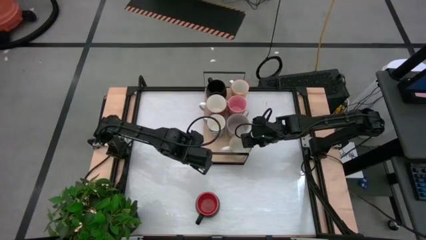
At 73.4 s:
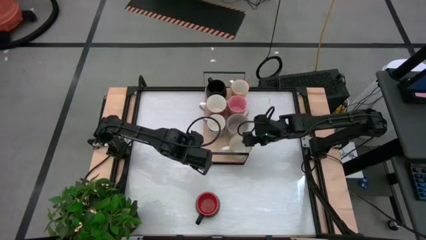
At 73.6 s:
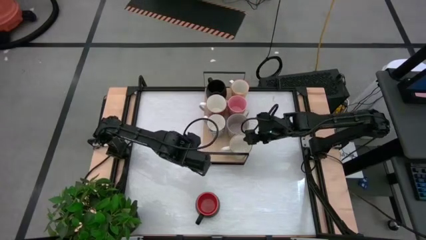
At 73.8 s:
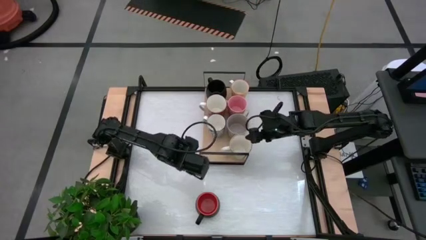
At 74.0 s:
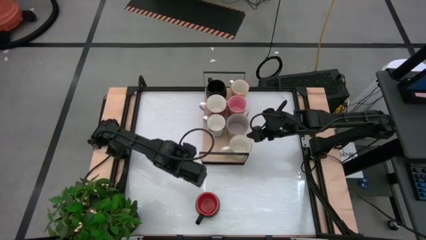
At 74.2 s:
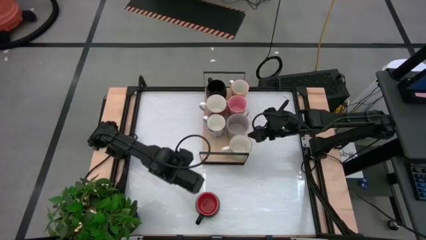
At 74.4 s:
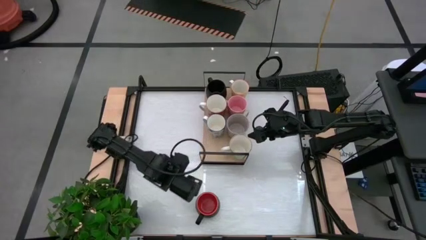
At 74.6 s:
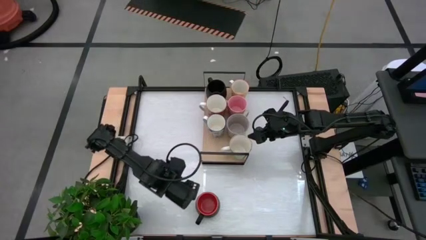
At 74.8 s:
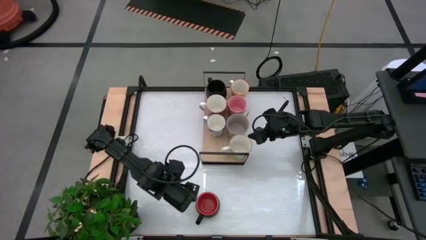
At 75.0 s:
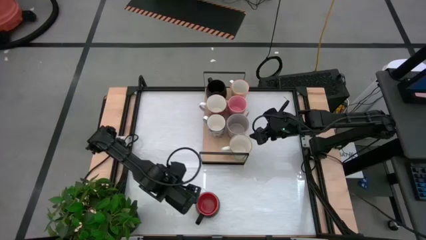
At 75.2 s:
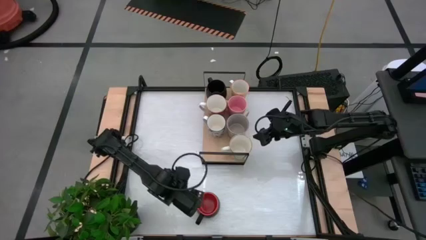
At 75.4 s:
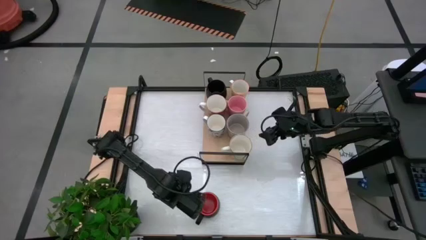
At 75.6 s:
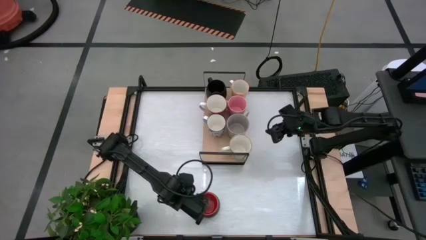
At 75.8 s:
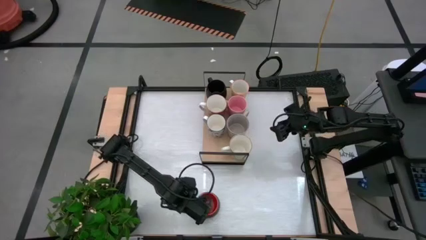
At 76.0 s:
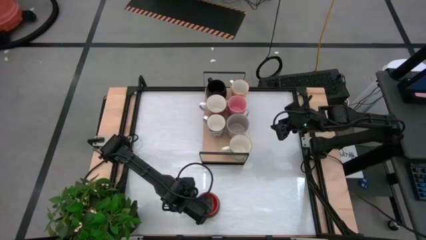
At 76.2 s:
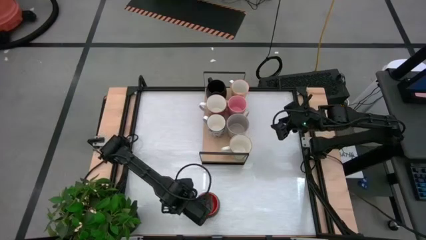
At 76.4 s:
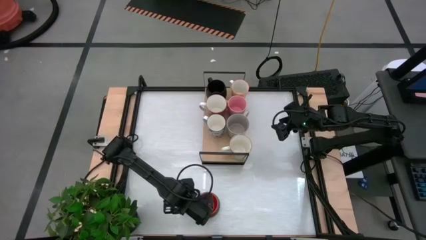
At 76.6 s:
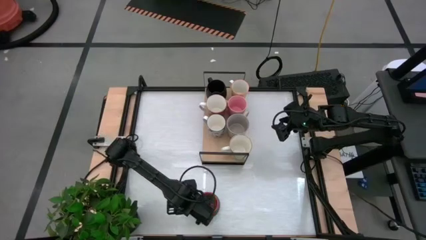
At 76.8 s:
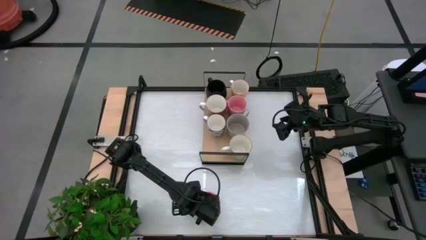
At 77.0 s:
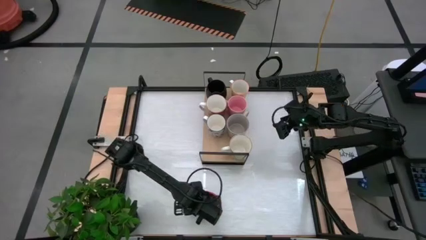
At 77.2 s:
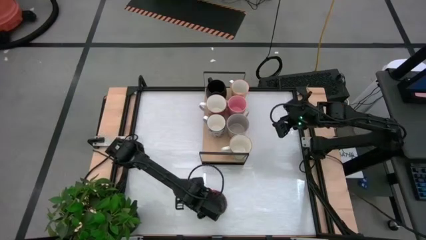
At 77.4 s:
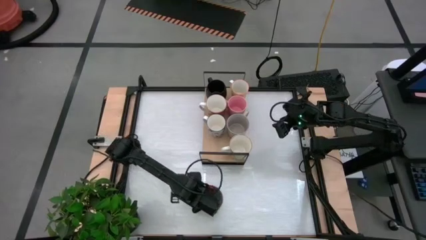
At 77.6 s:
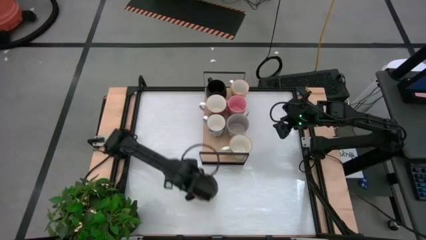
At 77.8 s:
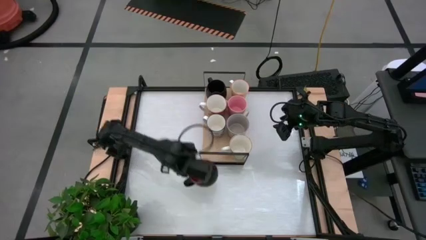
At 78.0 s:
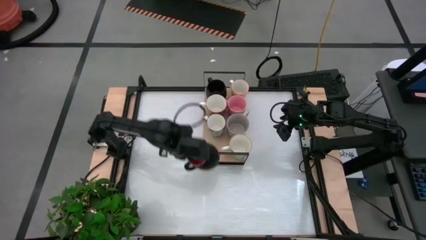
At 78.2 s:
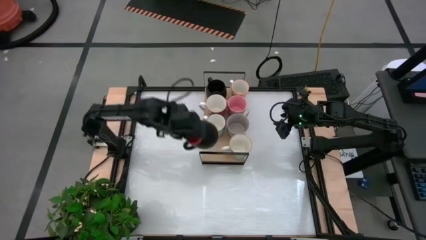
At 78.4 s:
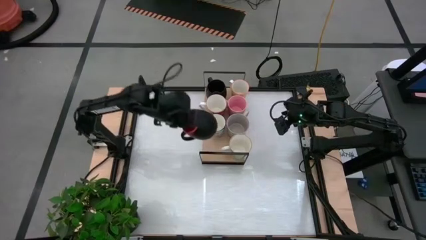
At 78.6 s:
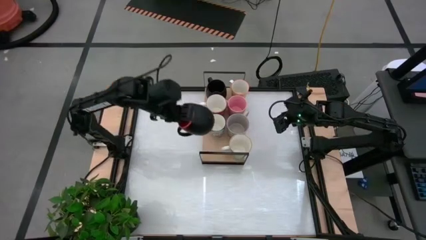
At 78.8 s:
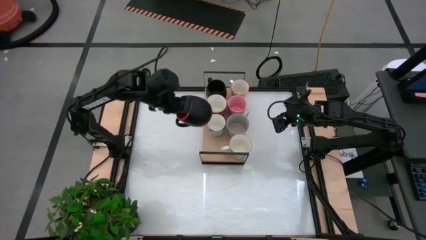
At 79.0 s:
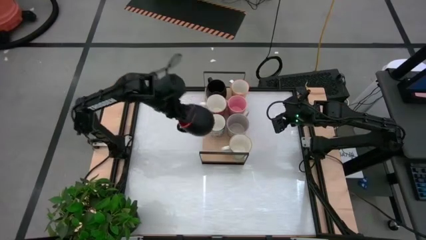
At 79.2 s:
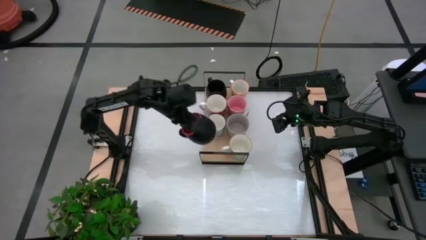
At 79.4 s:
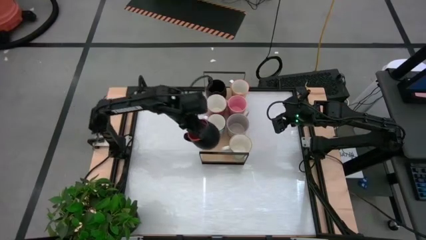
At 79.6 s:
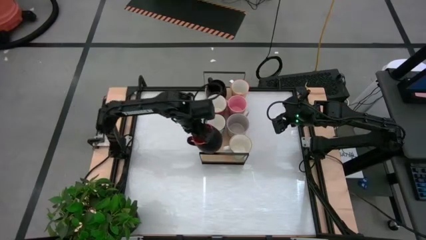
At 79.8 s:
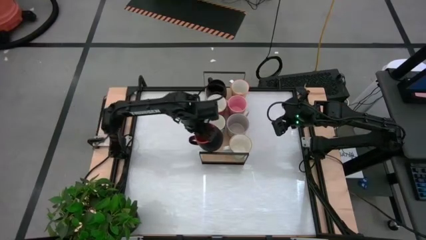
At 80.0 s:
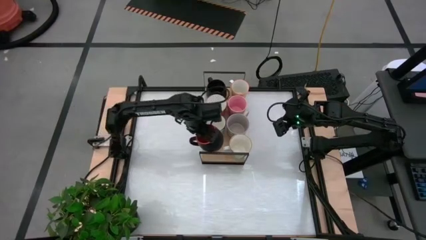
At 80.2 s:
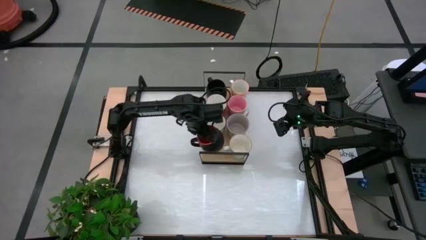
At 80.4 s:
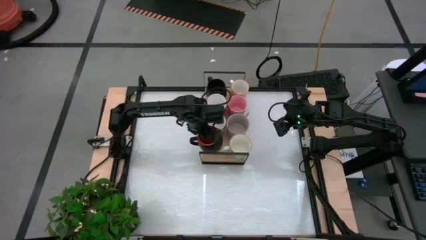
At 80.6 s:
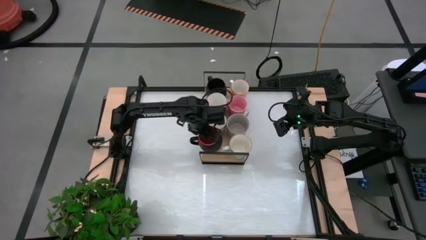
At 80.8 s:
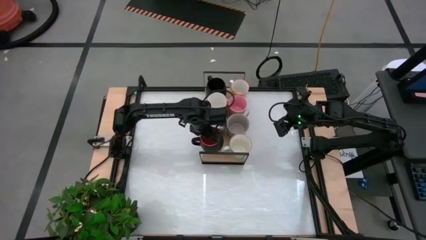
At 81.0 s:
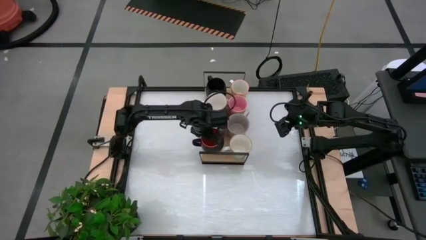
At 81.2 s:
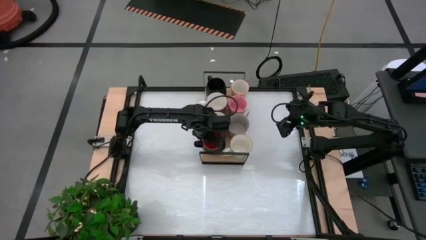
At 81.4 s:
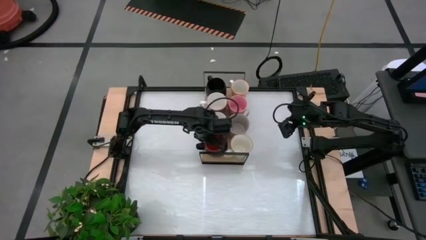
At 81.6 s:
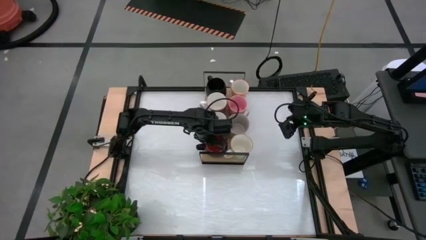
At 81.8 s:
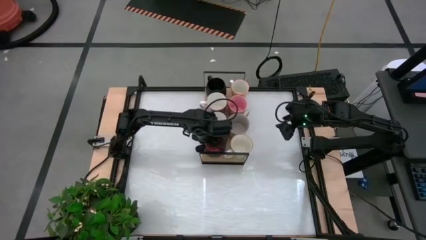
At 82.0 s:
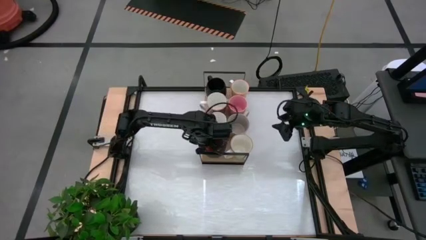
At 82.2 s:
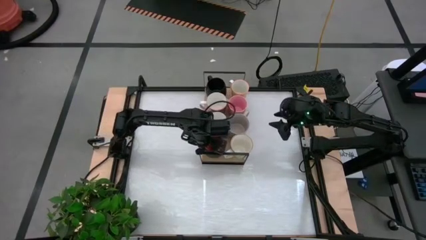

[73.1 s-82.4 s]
Task: Place coffee mugs
Put the black orange mug on the shelf

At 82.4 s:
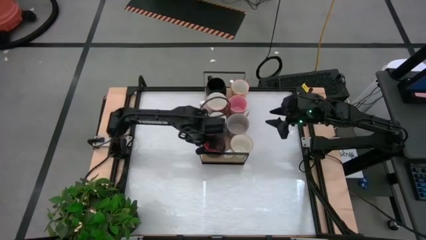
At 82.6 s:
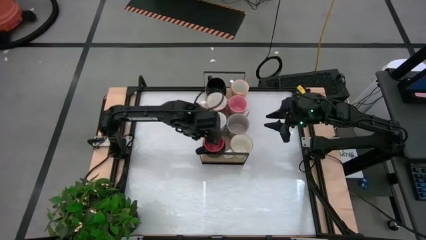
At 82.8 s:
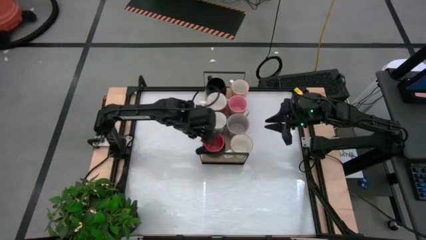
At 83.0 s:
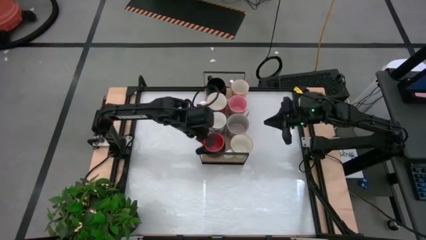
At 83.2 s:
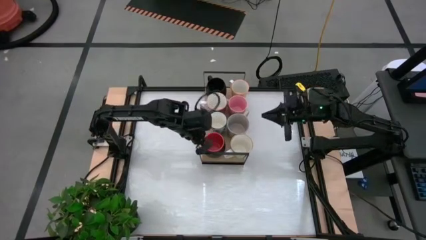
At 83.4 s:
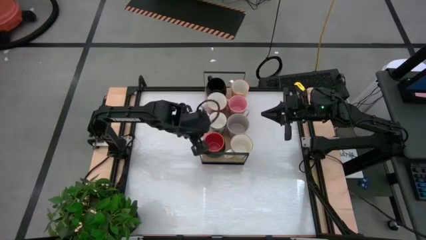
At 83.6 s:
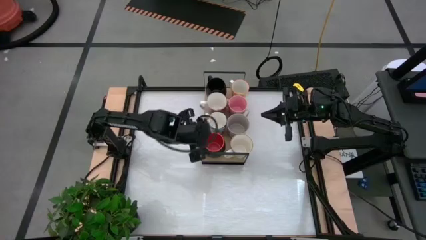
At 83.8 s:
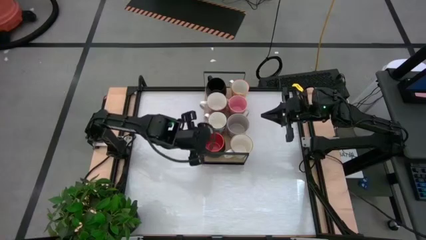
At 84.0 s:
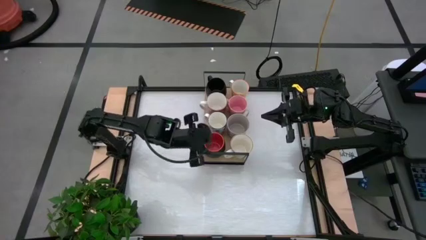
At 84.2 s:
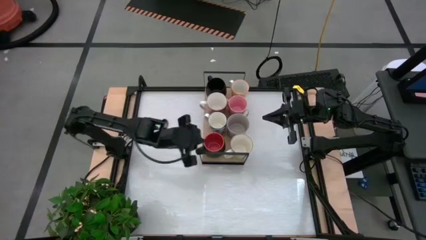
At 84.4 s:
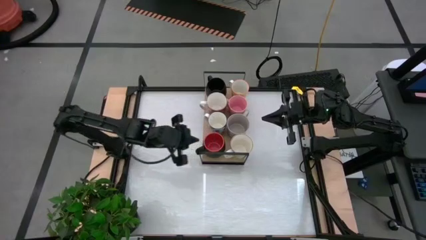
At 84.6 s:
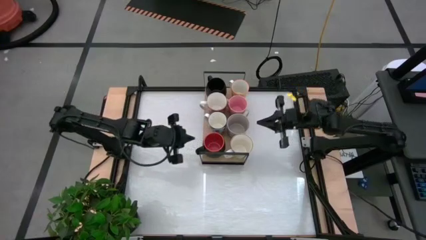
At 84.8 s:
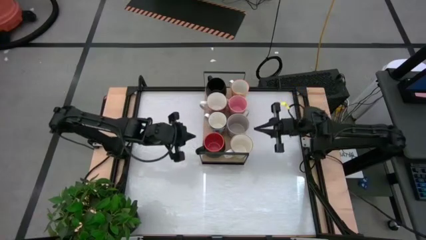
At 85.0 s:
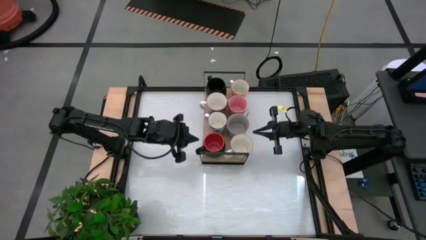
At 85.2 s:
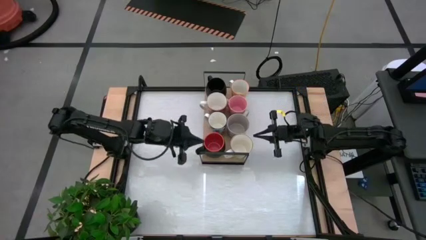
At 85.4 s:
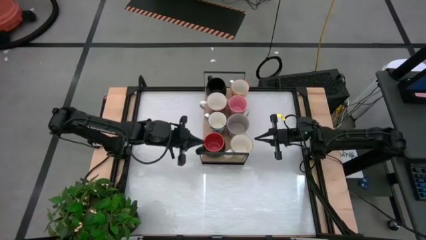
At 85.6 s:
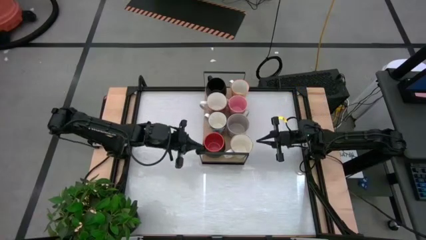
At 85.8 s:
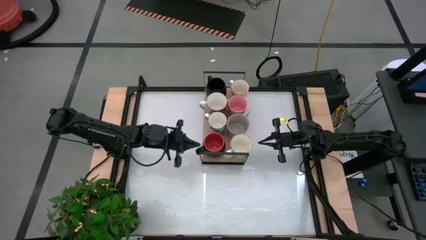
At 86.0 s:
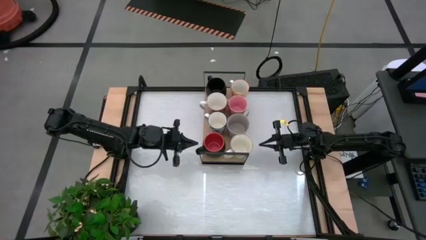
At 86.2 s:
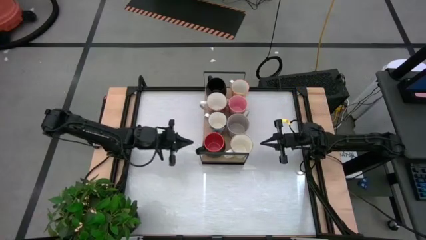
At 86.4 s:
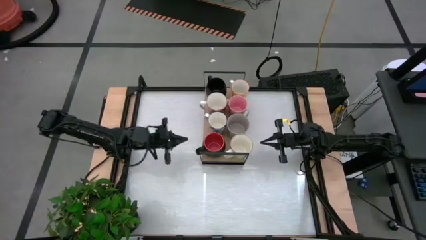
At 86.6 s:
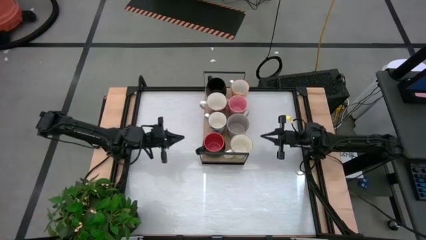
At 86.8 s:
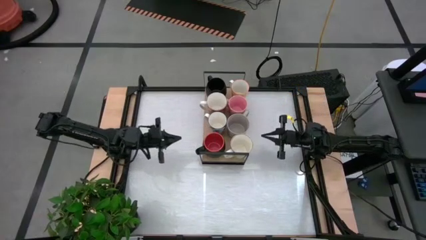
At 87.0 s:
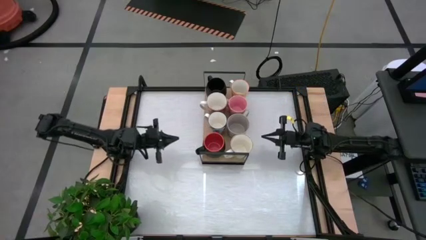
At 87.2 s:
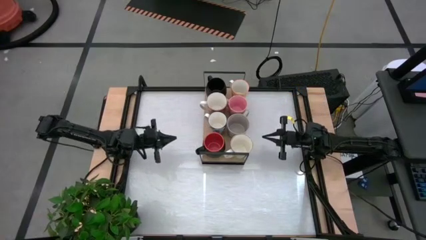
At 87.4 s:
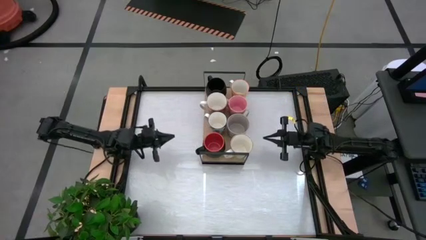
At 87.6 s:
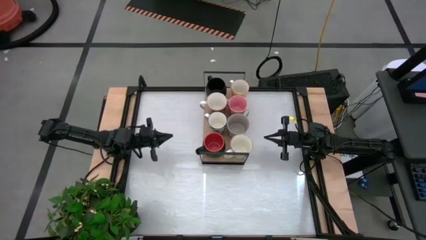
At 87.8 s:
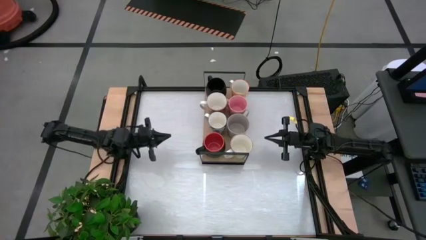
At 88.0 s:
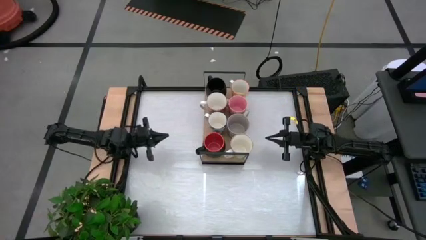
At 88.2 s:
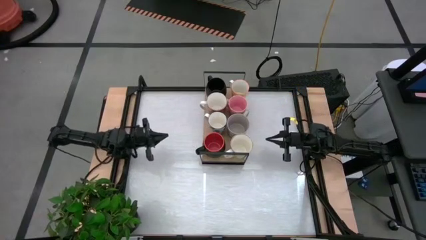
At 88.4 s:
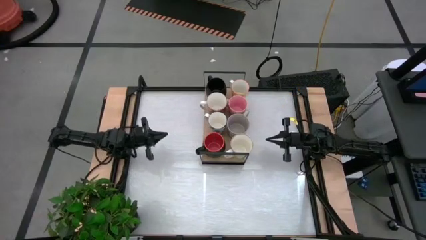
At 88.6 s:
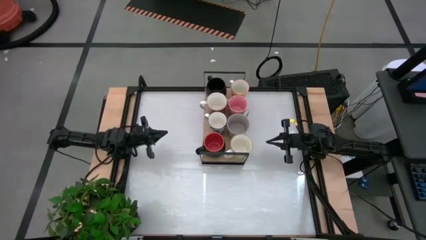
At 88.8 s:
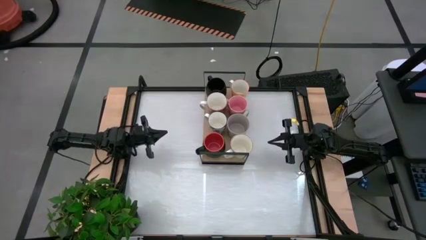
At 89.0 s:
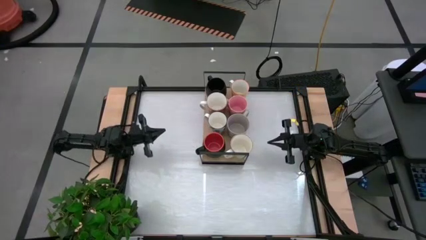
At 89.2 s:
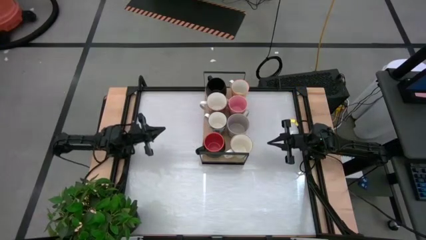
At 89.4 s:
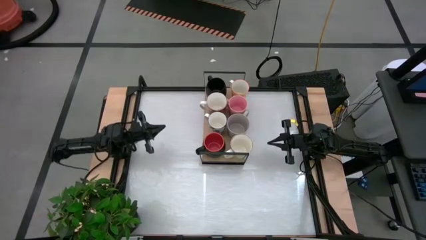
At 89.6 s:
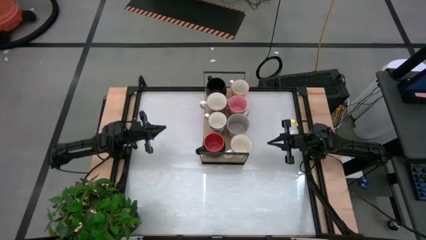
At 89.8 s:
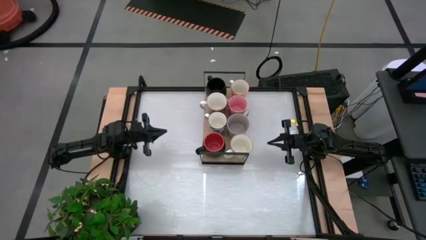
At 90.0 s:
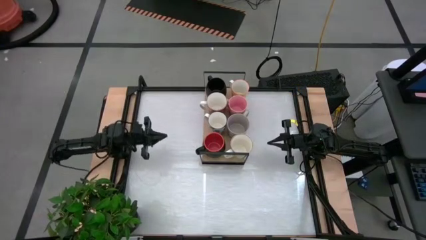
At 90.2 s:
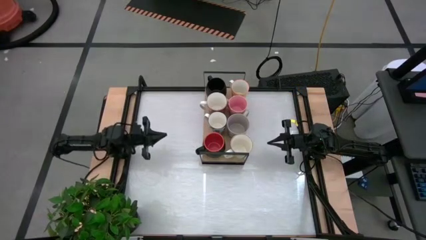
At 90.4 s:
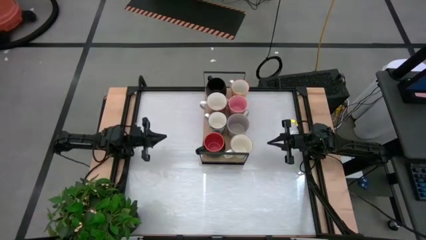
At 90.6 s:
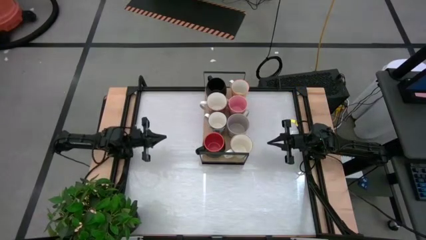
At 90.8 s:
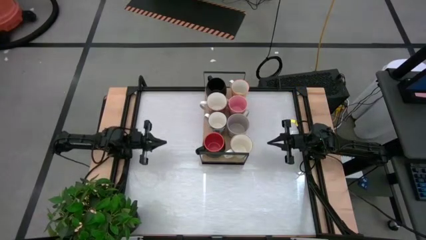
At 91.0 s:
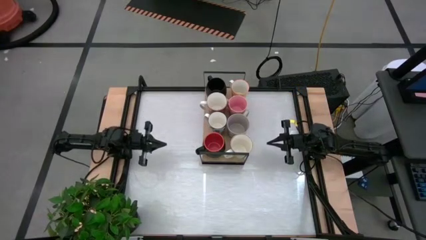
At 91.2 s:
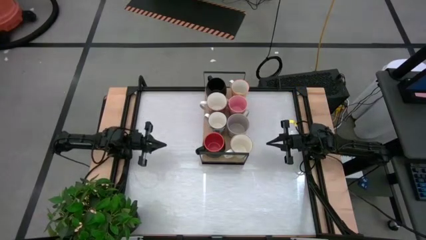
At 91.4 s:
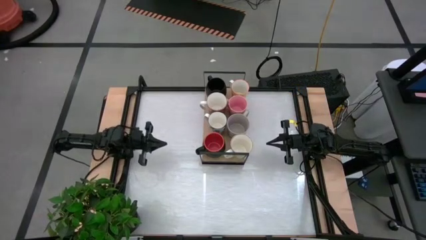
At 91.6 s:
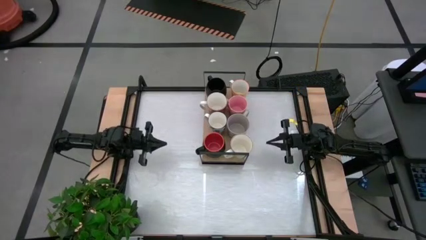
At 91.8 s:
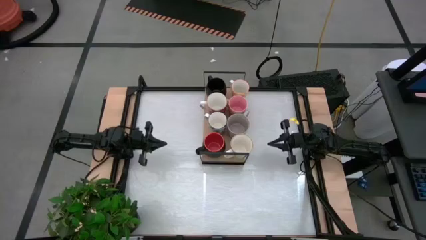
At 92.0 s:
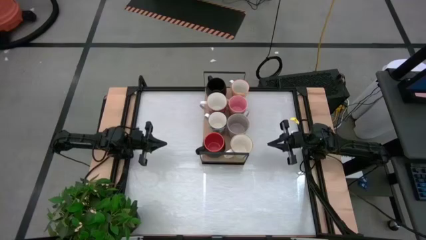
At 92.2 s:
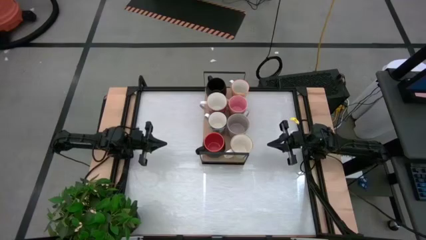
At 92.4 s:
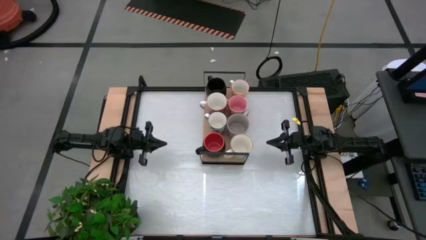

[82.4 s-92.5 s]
Return to Home Position
